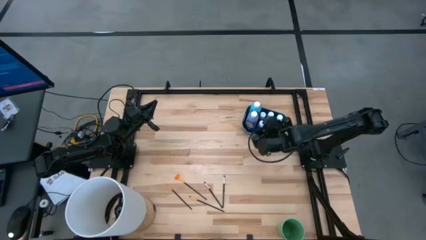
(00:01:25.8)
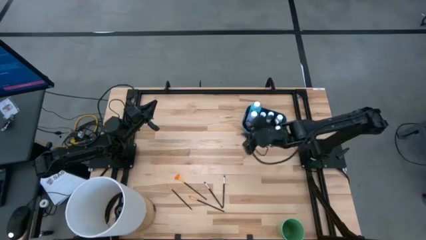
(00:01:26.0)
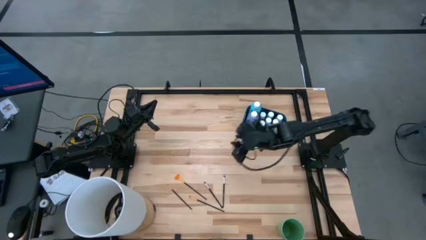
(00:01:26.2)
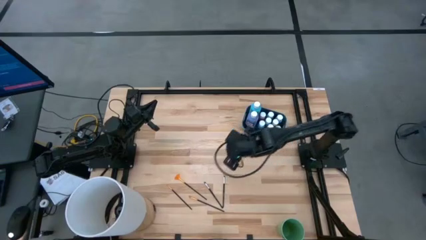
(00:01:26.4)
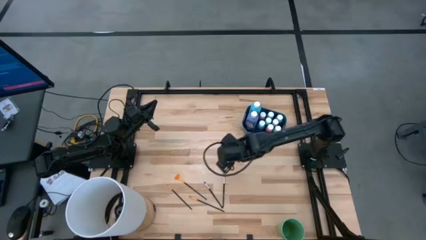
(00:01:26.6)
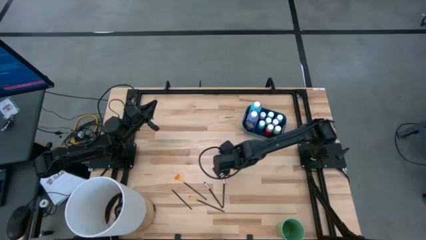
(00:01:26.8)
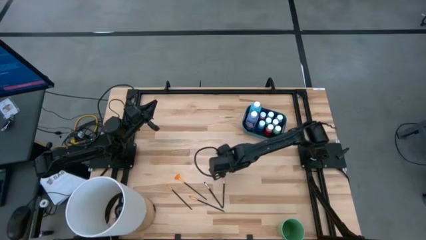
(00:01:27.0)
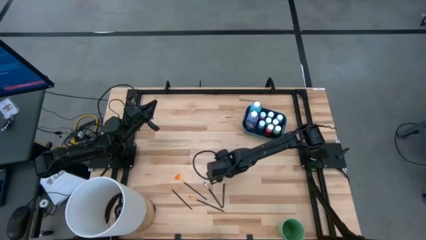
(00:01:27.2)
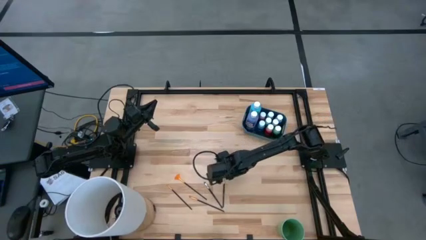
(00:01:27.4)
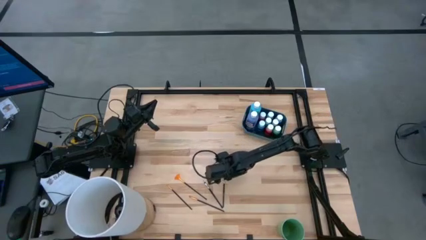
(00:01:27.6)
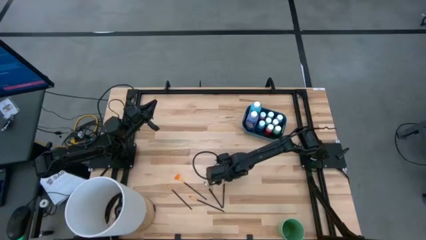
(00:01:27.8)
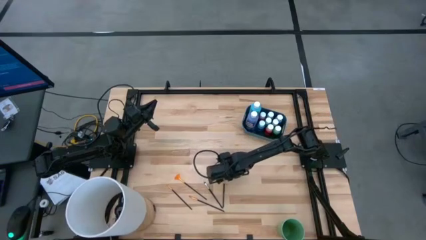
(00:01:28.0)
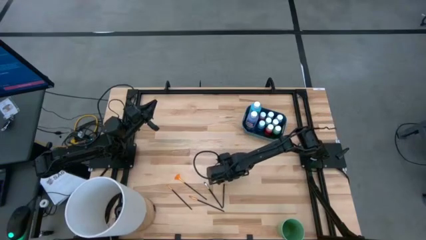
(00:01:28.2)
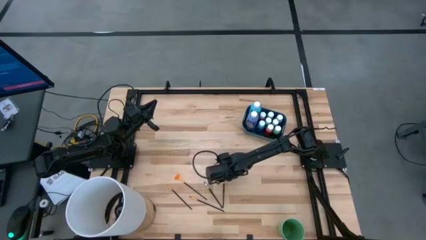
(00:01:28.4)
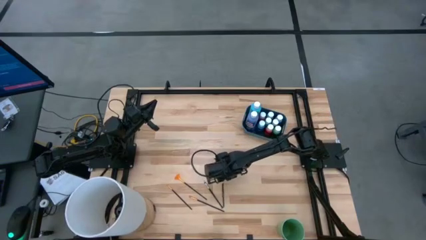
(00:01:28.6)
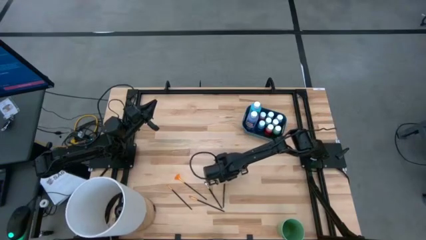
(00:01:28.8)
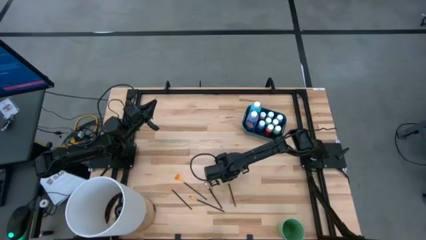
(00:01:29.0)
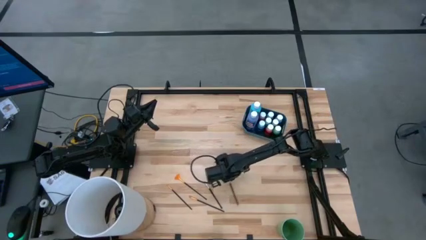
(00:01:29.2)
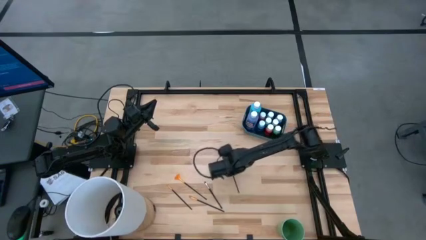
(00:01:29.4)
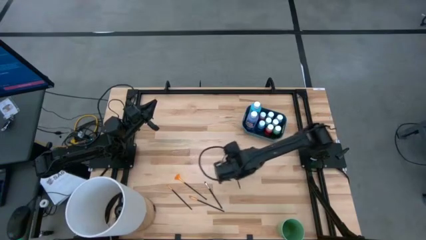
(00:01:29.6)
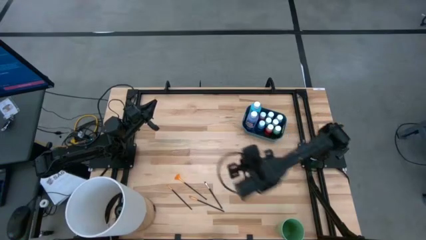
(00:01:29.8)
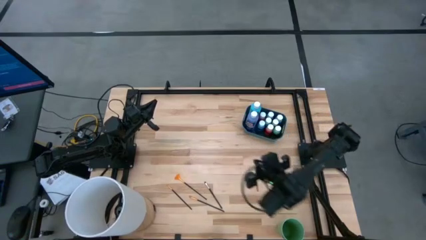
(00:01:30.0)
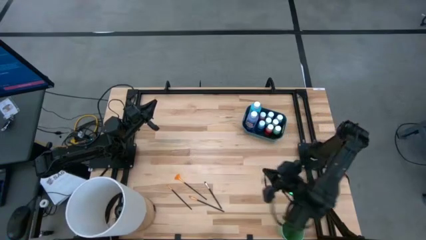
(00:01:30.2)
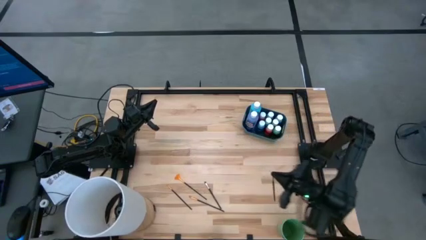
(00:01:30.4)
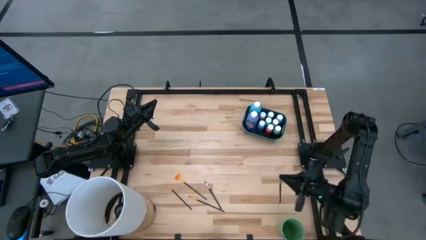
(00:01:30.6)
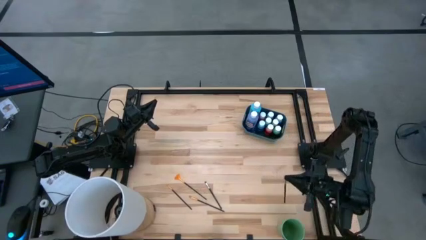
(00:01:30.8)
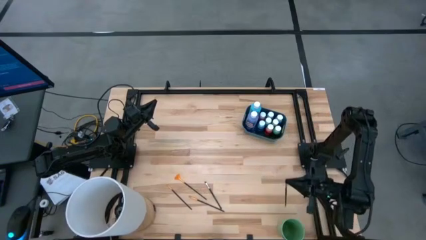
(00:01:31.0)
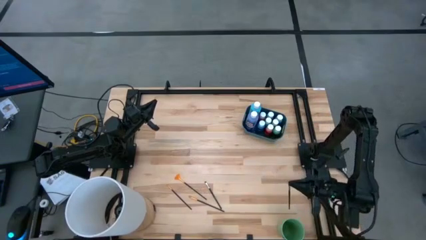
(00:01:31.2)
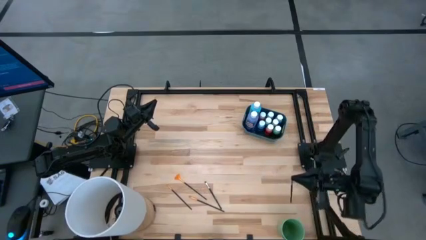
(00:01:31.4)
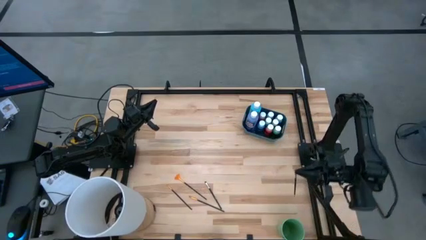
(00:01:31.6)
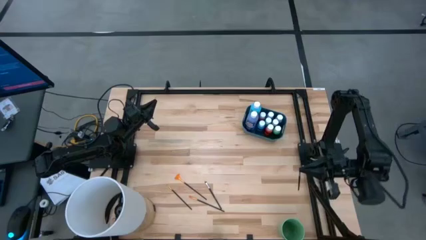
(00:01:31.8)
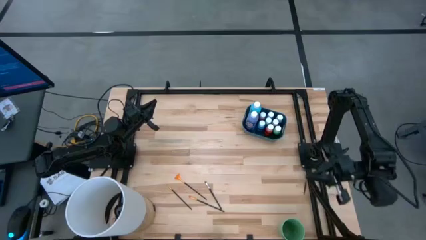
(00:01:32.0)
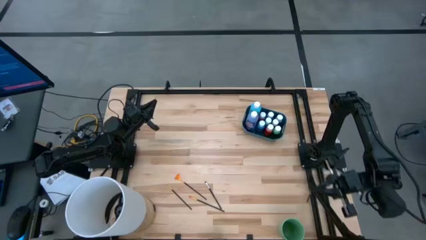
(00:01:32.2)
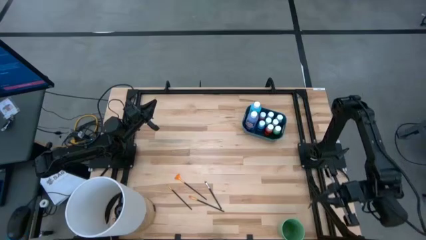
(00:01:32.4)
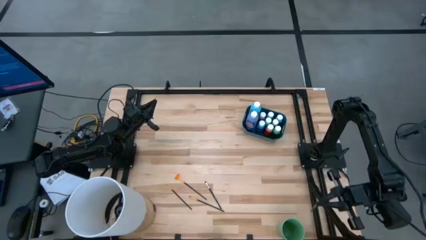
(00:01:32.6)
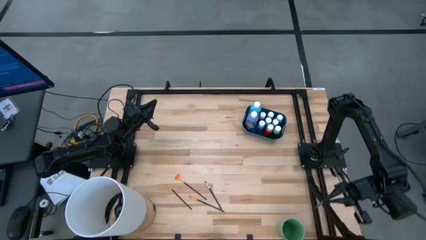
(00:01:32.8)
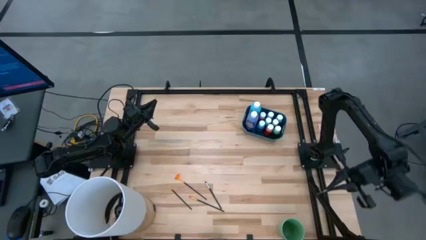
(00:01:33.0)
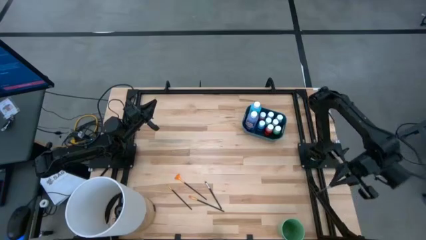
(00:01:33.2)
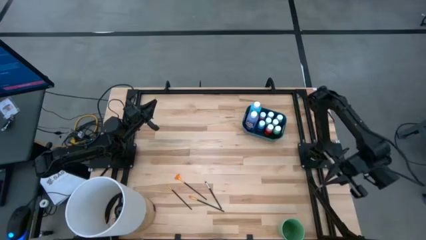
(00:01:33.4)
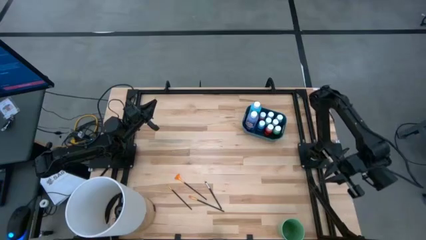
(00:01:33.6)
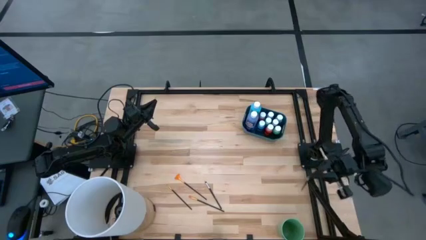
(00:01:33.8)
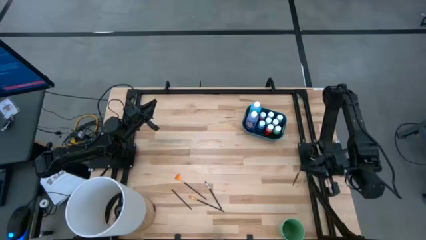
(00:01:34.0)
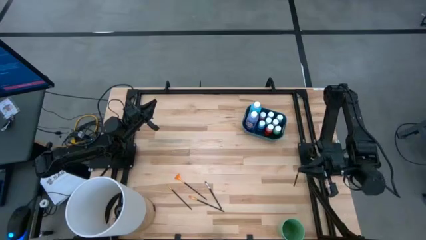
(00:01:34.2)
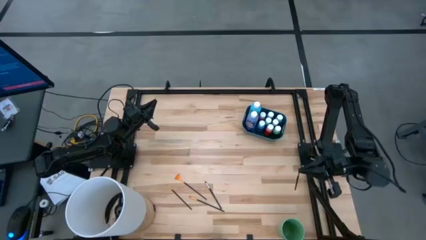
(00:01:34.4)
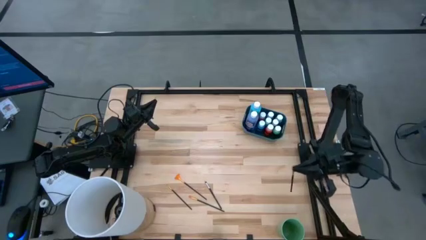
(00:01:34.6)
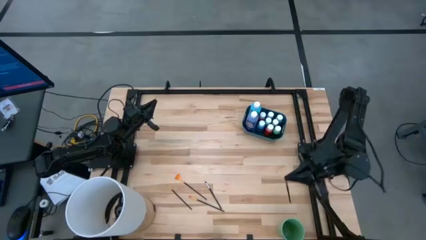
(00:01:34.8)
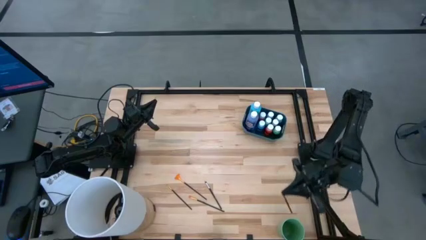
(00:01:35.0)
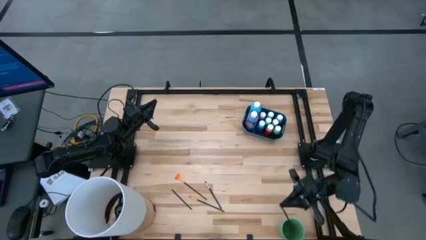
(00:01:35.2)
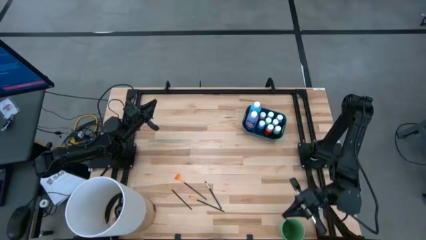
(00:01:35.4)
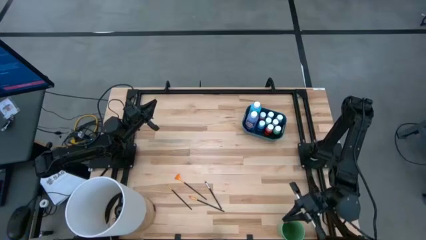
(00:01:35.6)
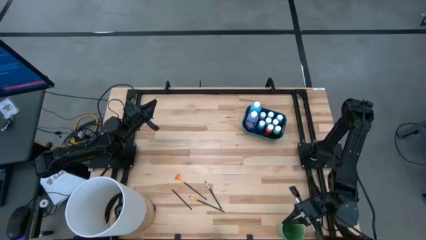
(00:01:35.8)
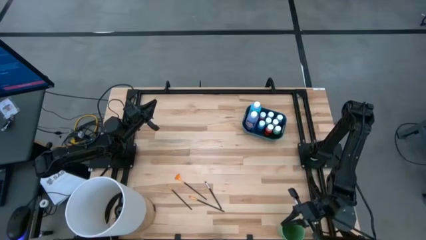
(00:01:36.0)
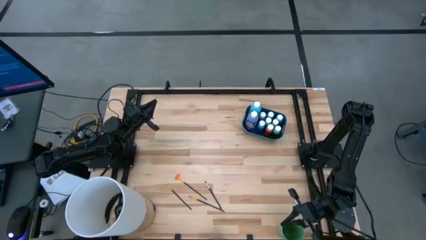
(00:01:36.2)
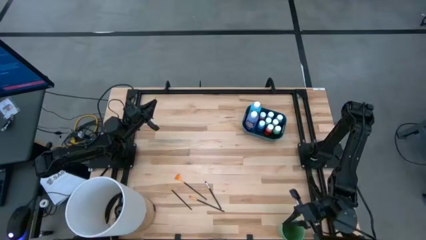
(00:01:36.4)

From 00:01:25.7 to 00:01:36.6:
Task: Pick & Place Paint Supplies
Put the right silver paint brush into the green cup

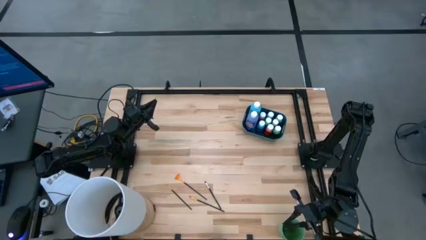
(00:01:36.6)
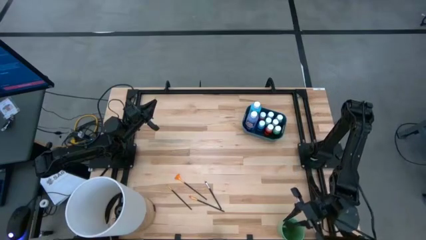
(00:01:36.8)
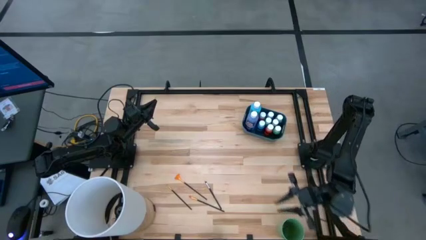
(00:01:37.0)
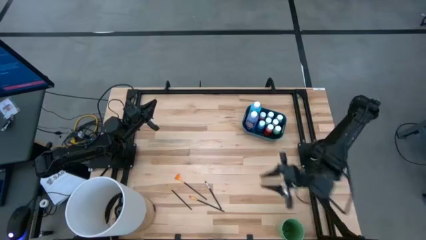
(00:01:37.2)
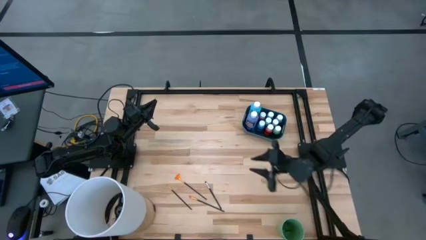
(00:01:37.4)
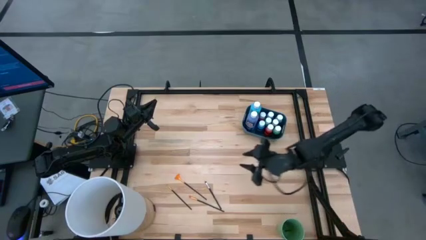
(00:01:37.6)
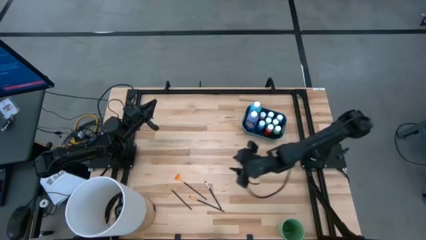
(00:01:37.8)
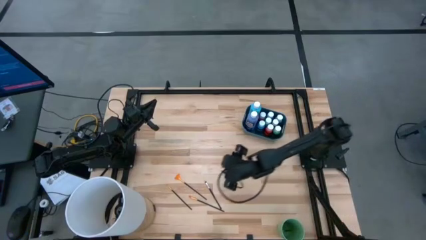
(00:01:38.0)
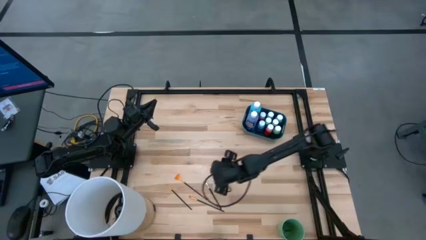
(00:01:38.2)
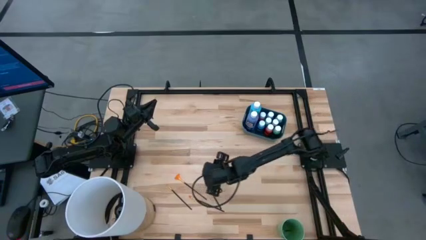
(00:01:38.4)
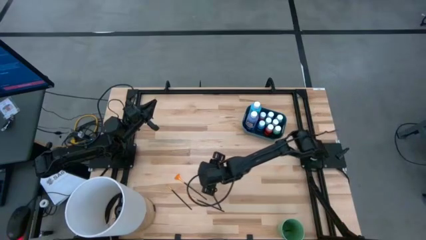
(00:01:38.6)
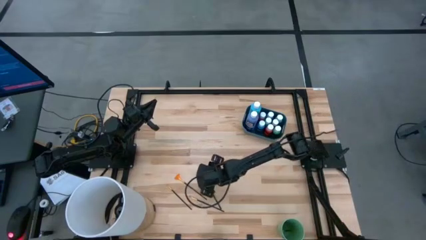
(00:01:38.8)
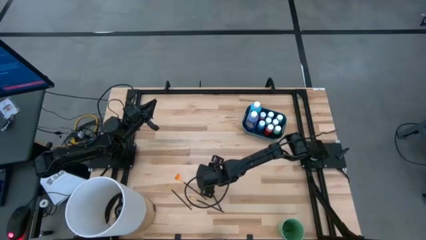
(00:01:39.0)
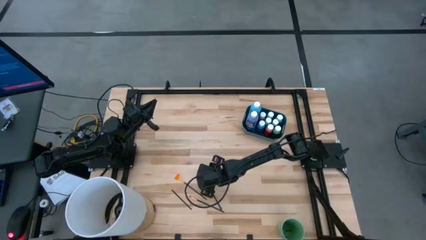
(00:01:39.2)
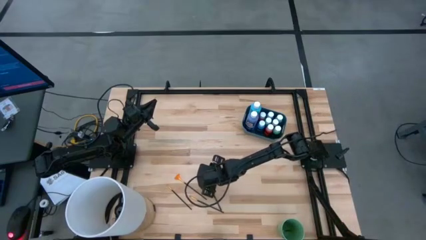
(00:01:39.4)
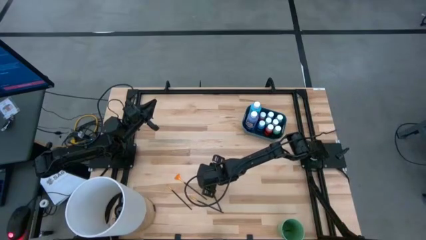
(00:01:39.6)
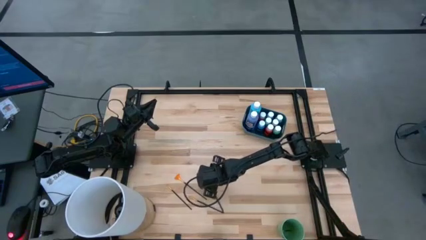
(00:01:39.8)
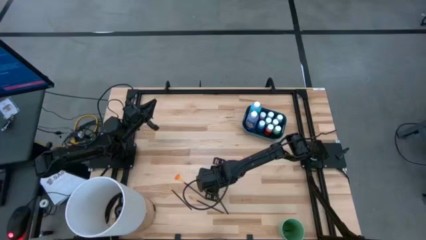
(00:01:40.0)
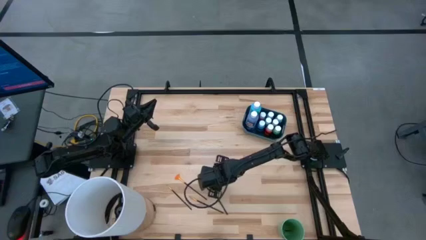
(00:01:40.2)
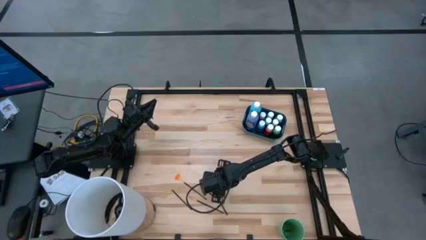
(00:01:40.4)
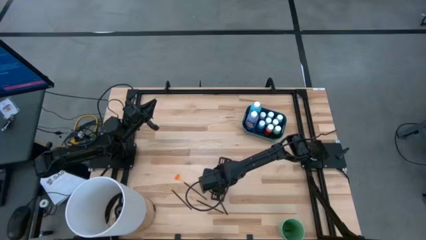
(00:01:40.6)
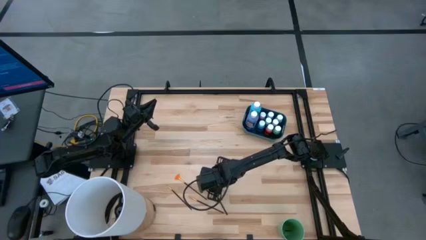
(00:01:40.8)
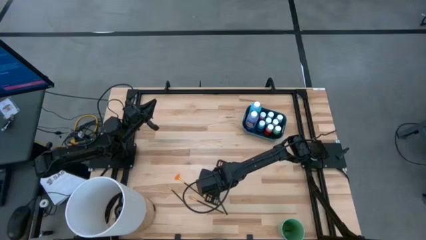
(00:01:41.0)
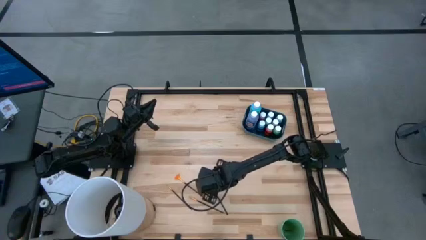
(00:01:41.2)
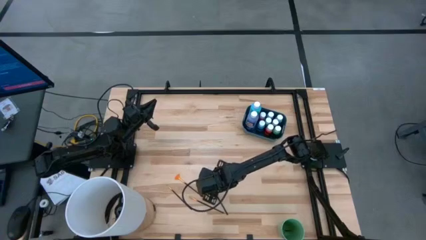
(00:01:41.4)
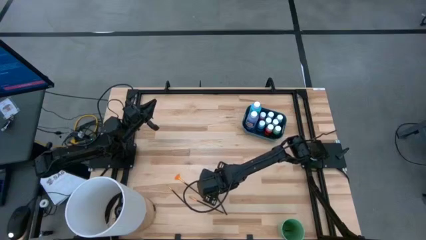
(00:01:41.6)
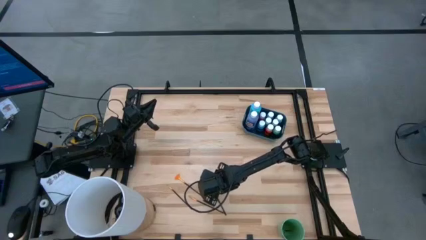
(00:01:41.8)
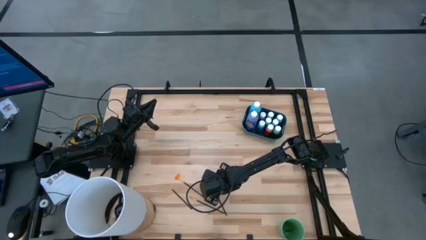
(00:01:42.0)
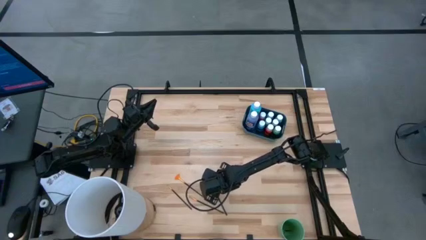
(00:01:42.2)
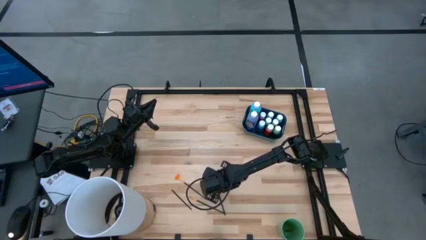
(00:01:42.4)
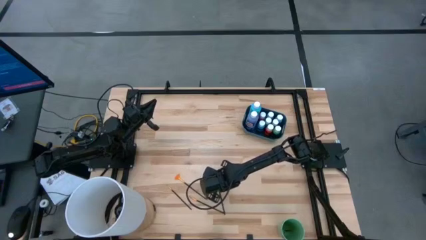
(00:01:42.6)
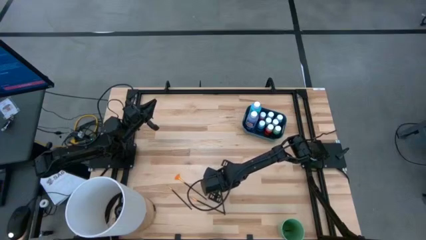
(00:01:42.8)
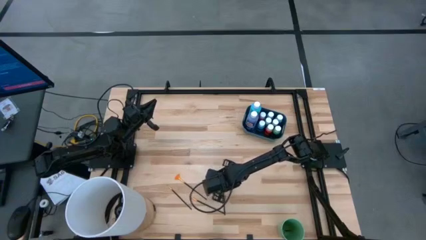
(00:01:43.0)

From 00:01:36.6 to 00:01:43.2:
Put the right silver paint brush into the green cup
